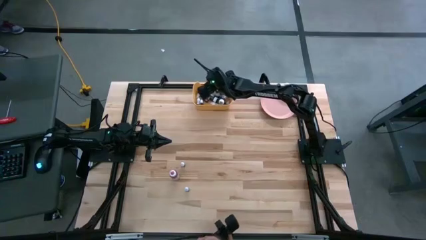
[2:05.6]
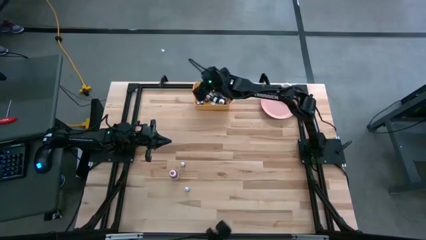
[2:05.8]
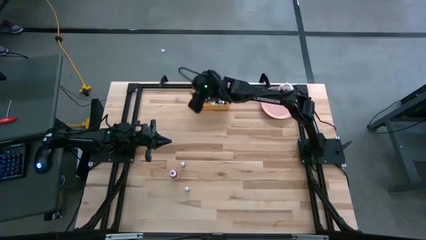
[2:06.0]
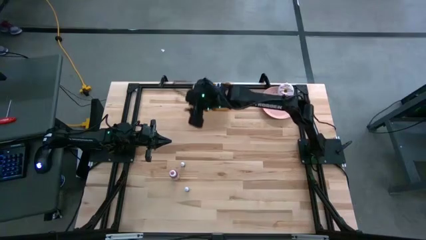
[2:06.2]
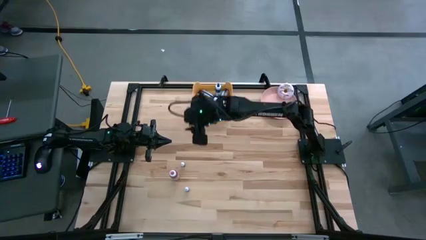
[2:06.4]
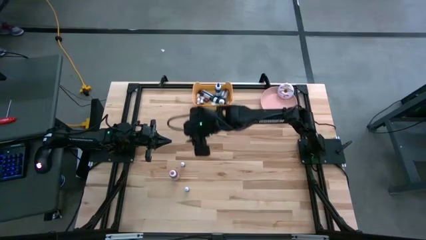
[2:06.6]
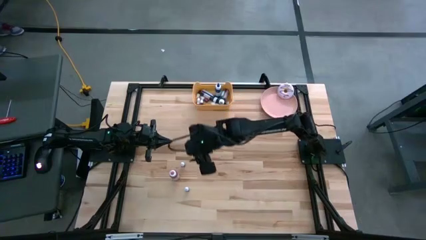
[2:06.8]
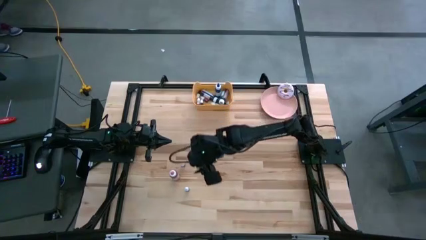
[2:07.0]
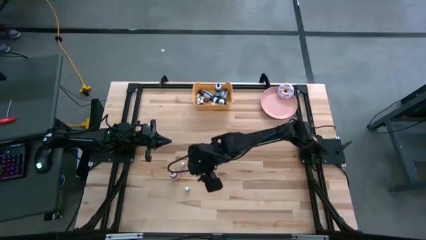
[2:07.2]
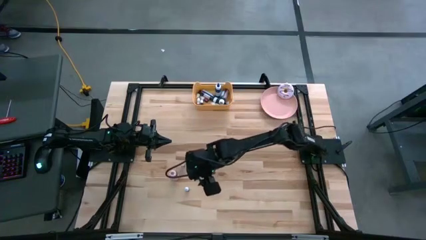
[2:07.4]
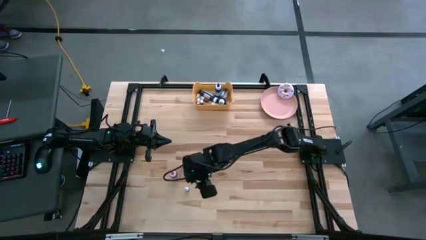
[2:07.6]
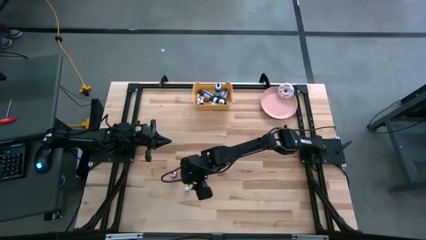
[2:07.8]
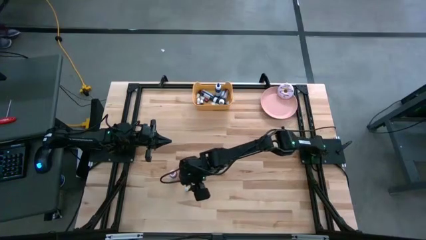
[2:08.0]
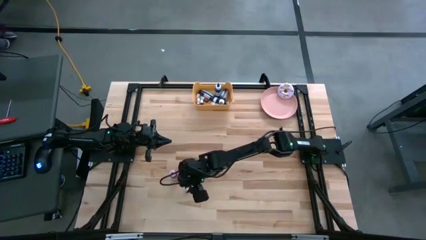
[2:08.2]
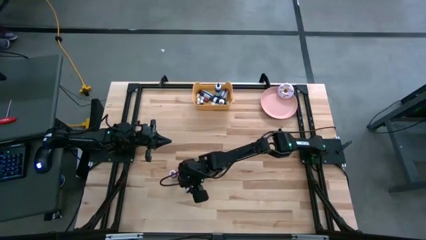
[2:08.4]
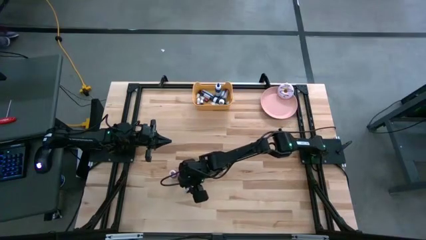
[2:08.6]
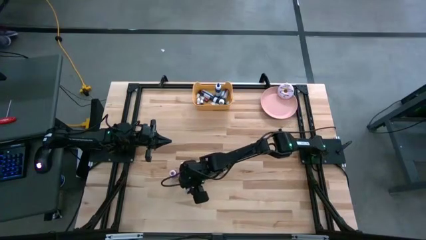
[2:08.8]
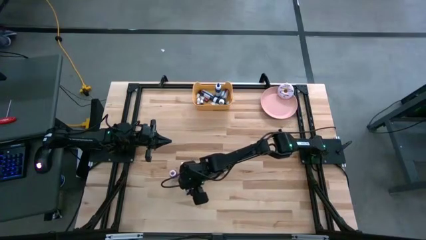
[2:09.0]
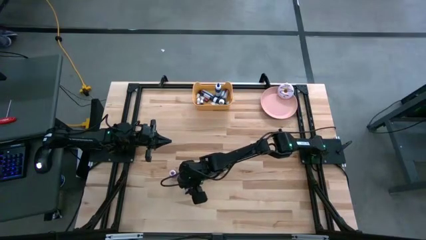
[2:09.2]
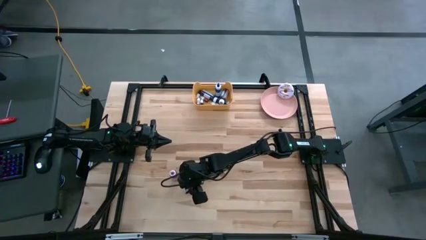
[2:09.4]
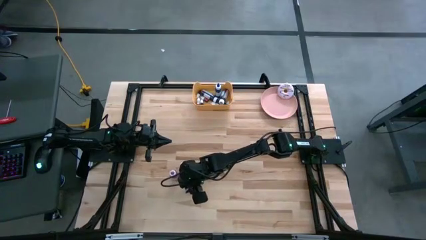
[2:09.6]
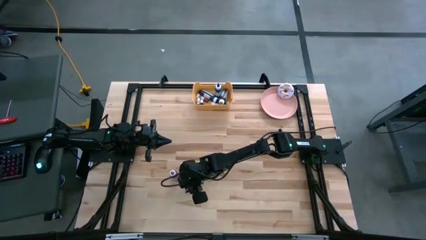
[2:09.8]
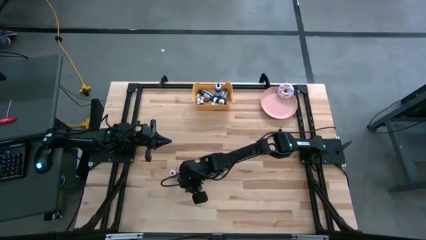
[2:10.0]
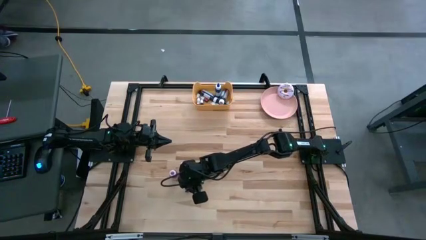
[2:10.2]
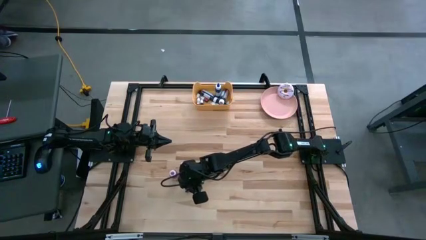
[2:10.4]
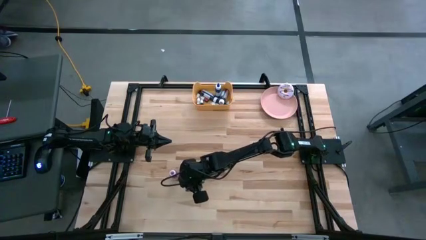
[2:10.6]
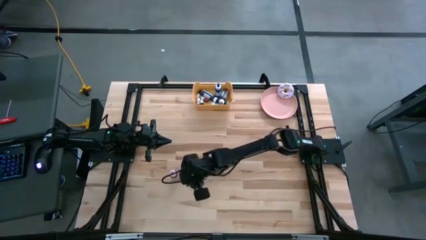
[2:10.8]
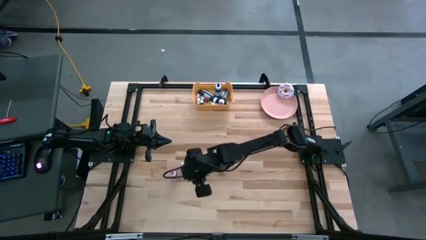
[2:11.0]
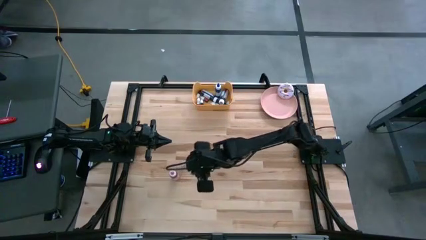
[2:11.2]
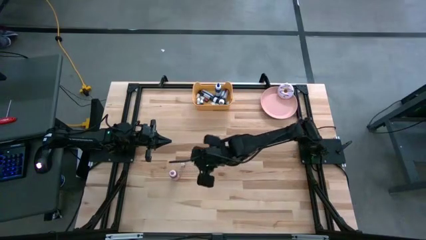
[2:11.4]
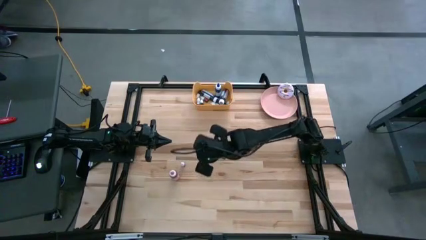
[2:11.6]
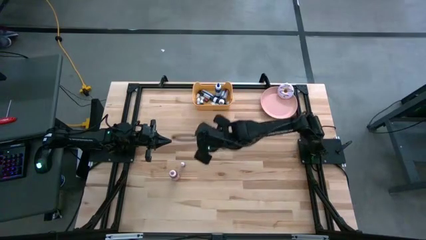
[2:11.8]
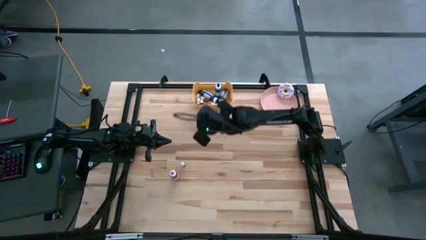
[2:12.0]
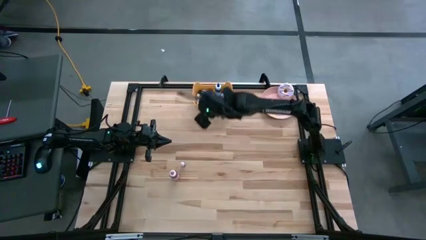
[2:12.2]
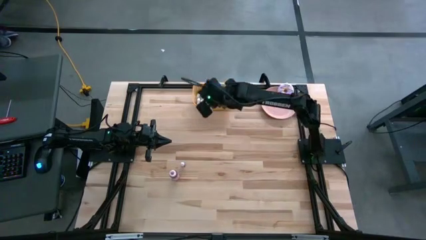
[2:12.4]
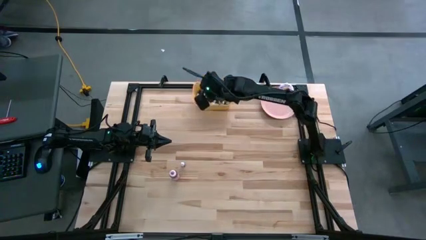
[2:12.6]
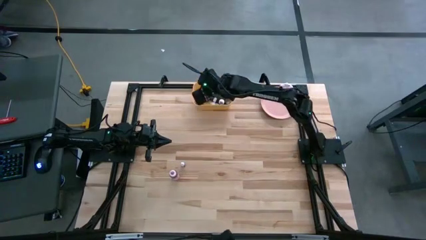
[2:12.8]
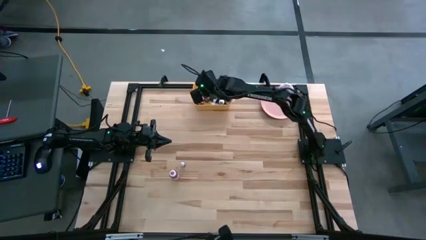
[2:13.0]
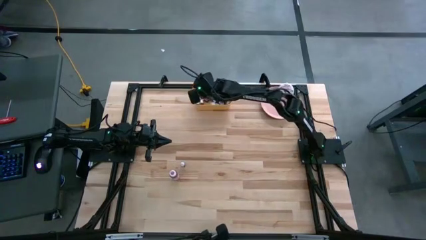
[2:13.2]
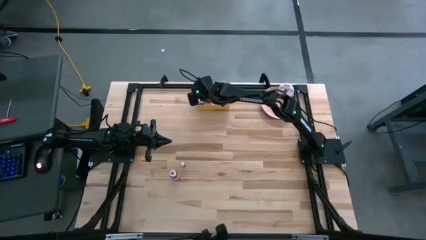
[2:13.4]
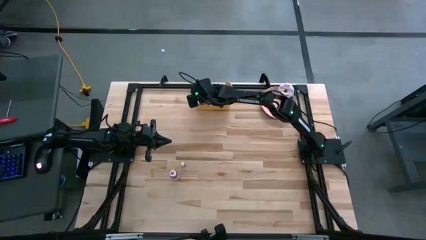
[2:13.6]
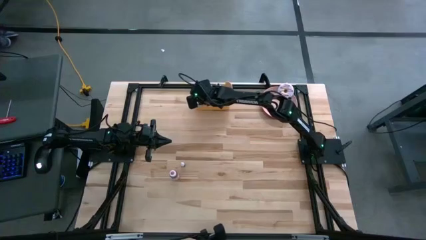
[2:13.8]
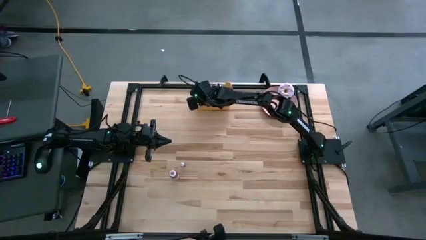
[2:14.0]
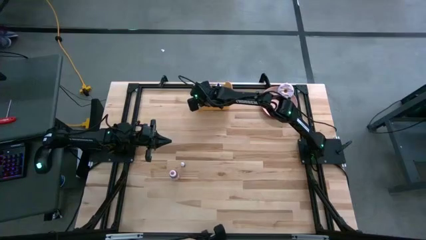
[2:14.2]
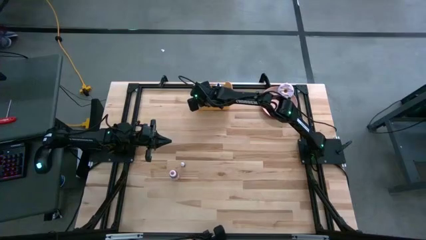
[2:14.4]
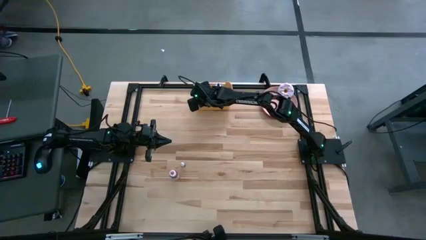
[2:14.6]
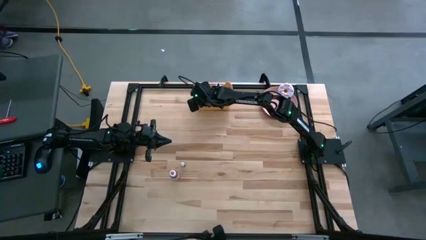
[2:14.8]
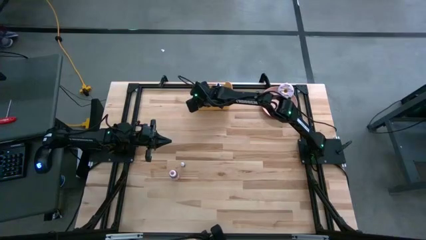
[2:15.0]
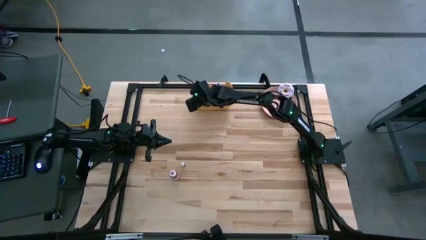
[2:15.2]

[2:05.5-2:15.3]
Task: Pick & Place food coloring
Put the small violet food coloring bottle into the yellow bin

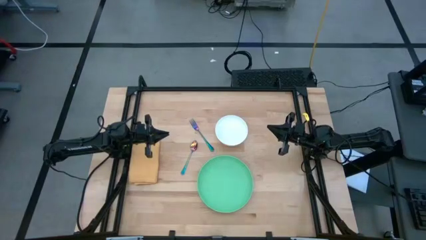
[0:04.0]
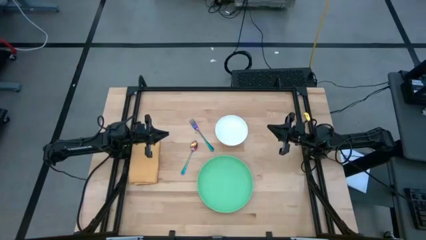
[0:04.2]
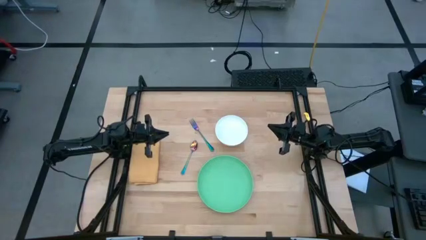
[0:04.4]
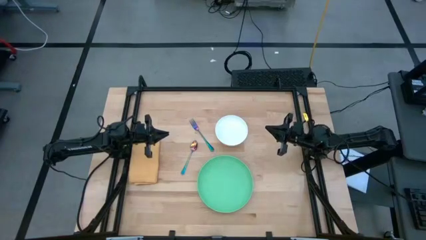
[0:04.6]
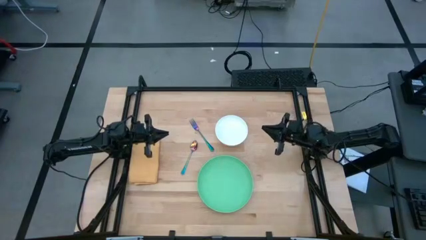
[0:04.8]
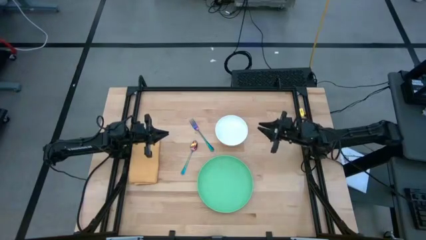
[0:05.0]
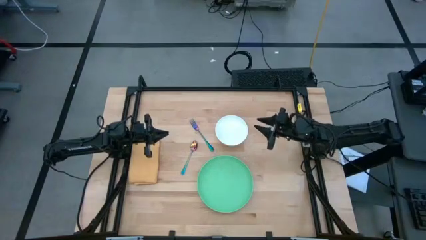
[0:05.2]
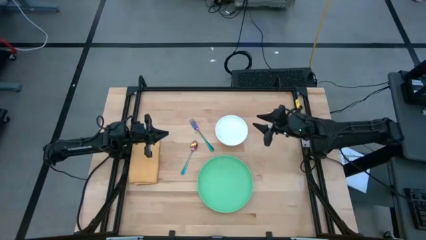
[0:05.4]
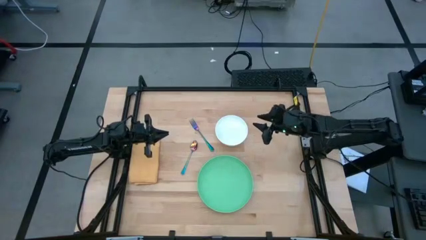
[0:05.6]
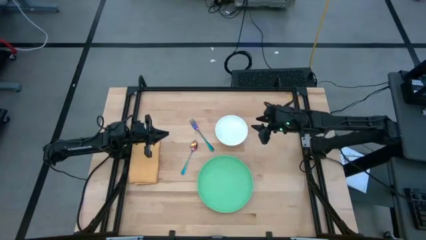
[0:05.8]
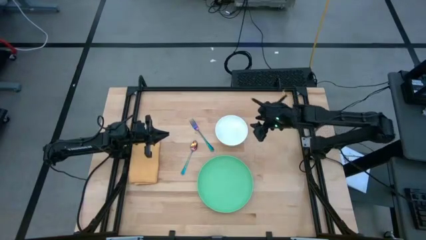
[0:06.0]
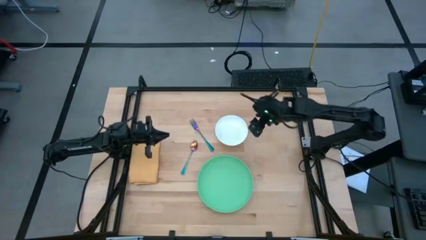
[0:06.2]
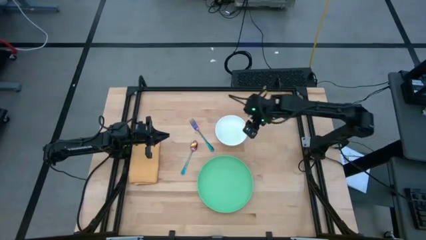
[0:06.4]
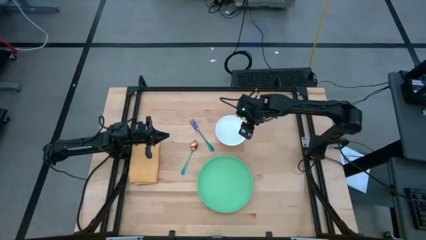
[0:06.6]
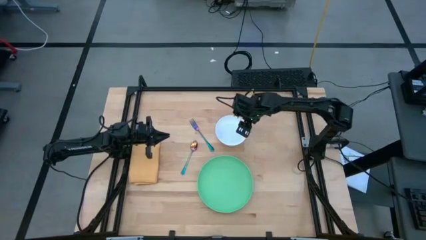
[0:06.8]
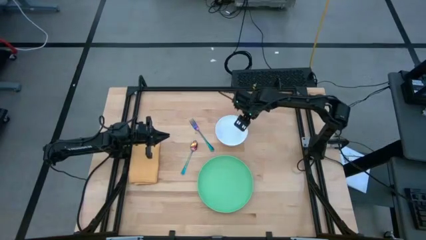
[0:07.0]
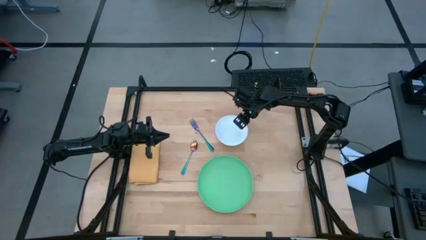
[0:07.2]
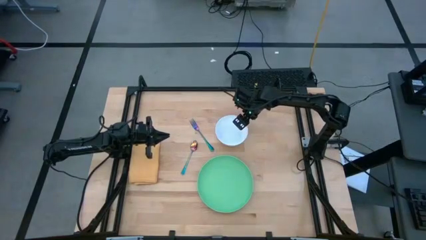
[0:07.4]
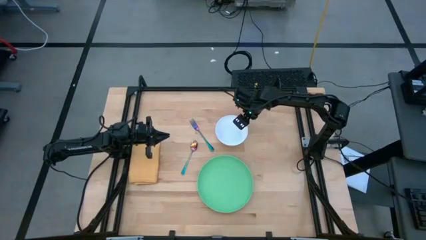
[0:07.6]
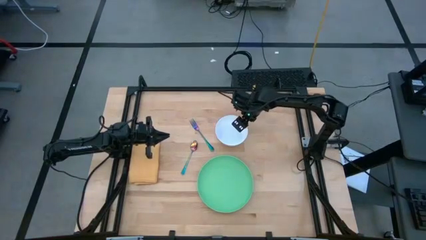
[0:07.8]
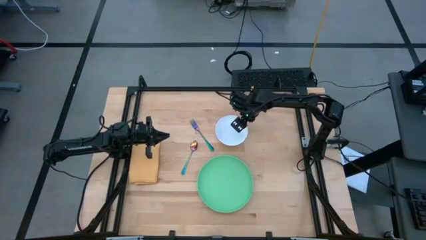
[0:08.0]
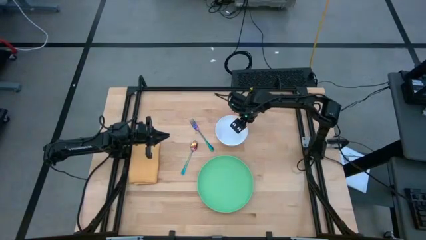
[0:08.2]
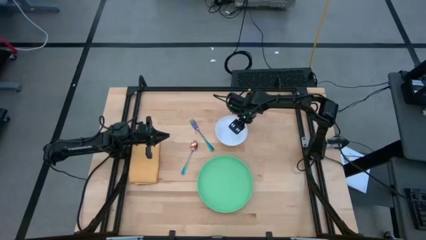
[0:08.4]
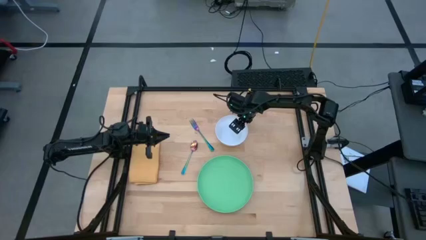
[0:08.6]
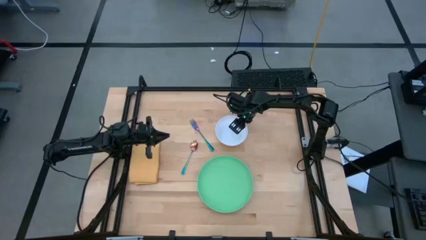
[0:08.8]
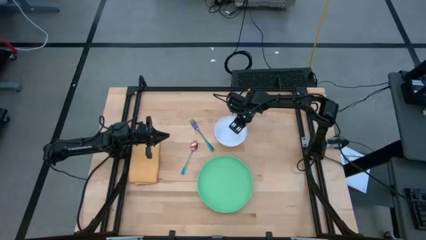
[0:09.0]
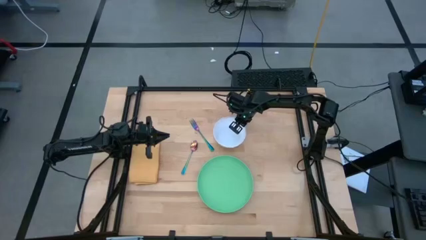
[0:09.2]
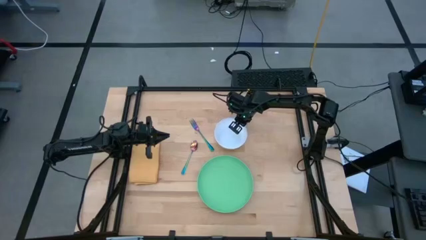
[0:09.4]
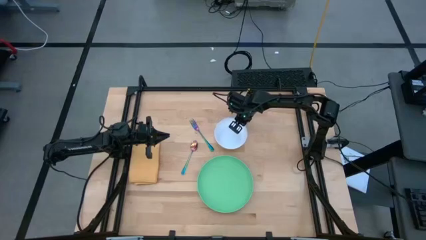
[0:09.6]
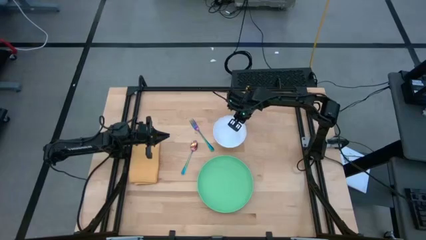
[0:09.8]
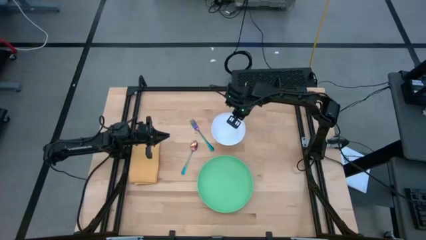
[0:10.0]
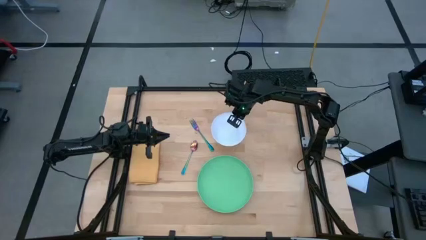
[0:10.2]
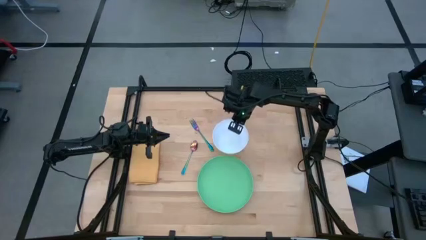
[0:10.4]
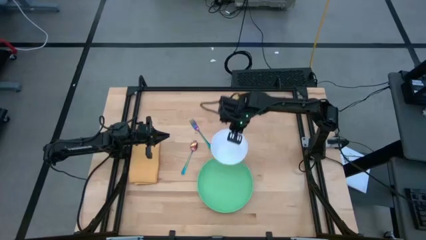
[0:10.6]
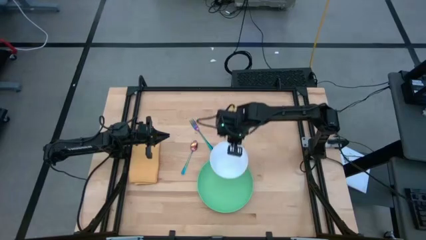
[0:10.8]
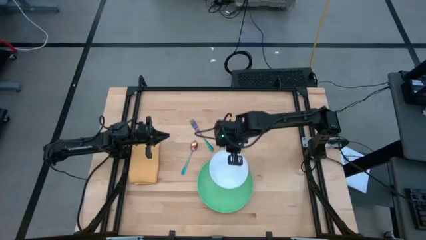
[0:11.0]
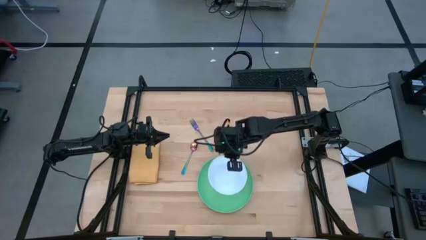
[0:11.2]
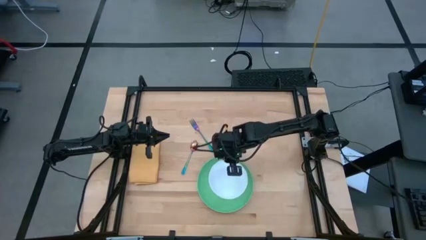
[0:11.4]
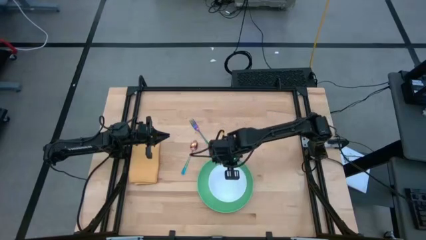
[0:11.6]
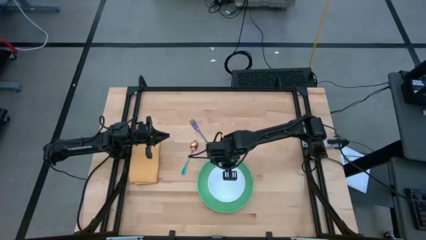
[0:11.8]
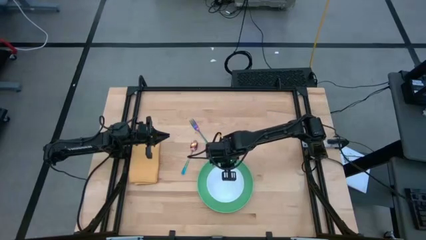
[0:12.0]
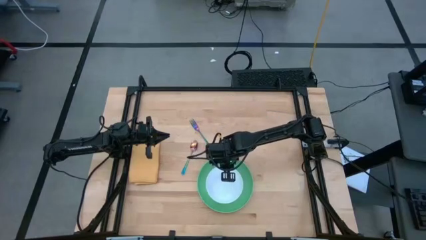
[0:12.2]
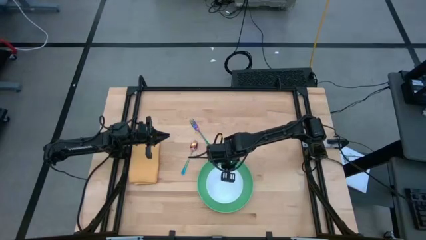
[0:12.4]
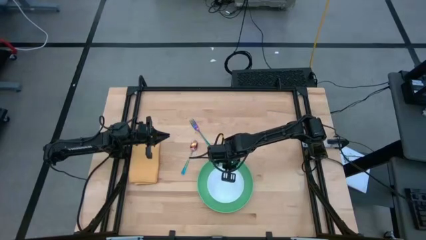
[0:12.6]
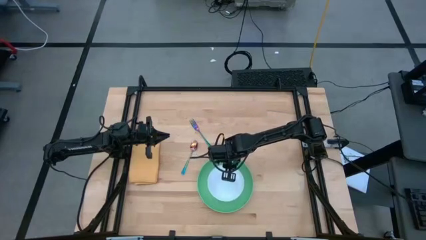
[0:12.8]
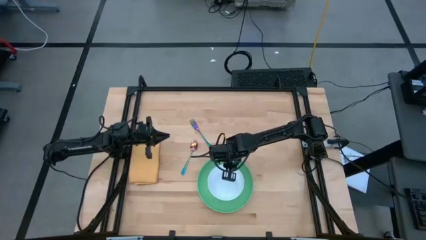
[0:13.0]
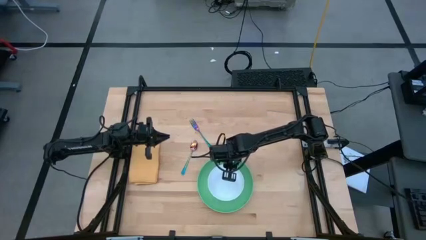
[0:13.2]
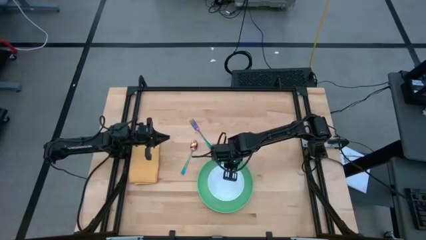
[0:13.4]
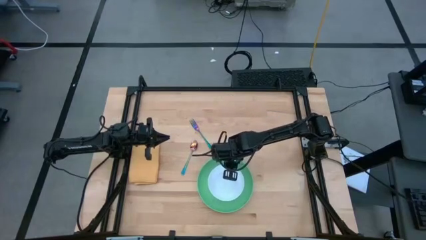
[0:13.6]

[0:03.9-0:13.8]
Task: Set table place
Put the white bowl on the green plate
